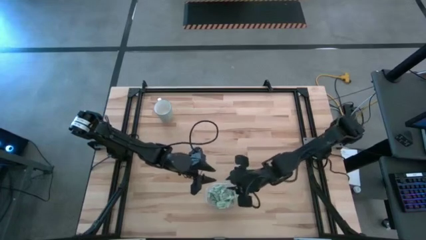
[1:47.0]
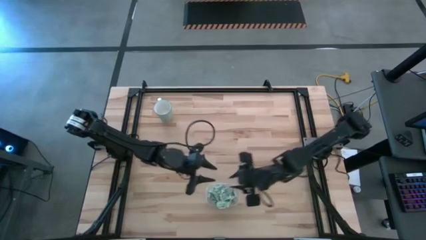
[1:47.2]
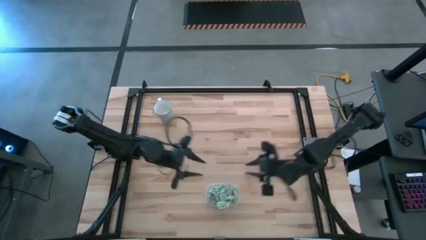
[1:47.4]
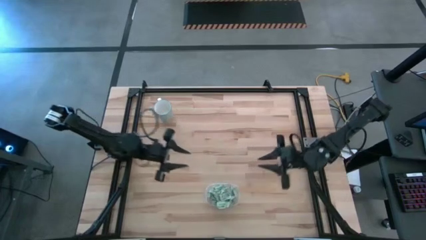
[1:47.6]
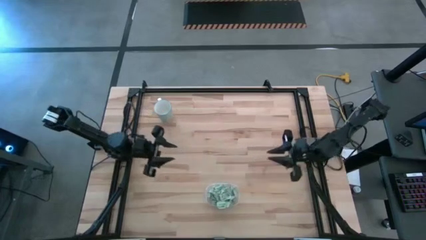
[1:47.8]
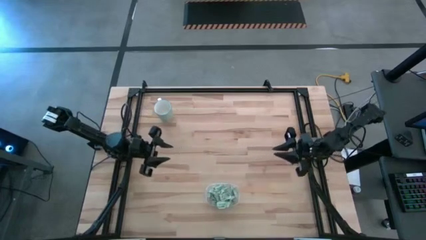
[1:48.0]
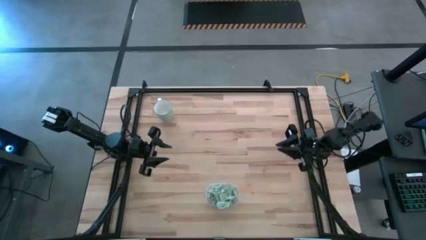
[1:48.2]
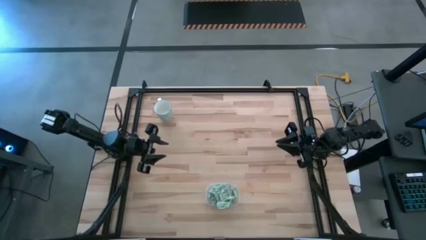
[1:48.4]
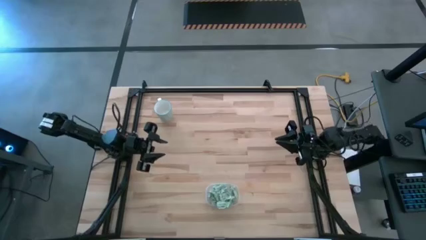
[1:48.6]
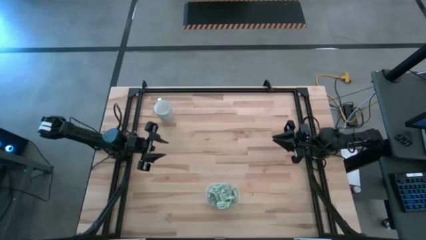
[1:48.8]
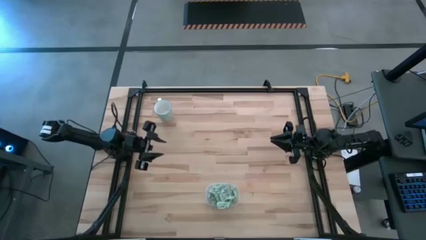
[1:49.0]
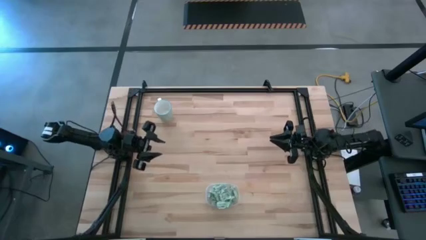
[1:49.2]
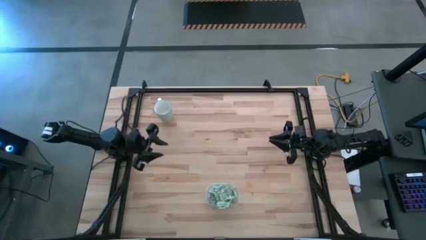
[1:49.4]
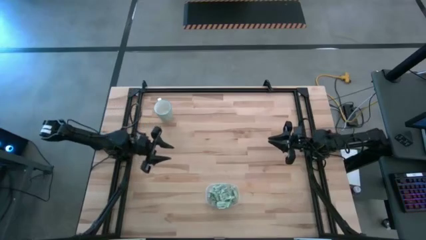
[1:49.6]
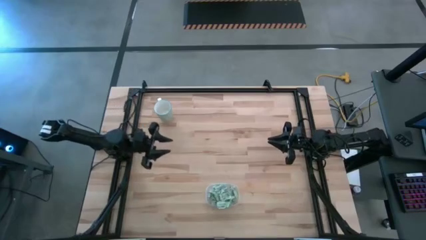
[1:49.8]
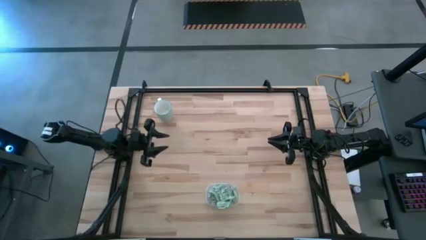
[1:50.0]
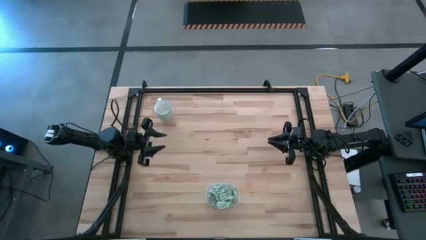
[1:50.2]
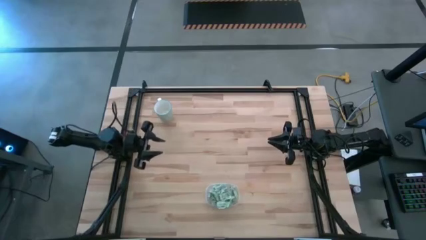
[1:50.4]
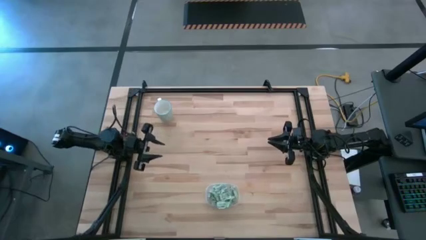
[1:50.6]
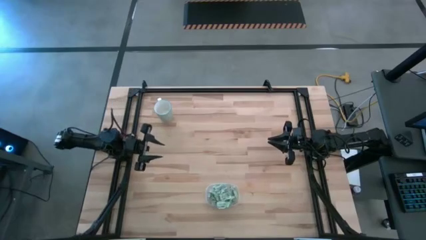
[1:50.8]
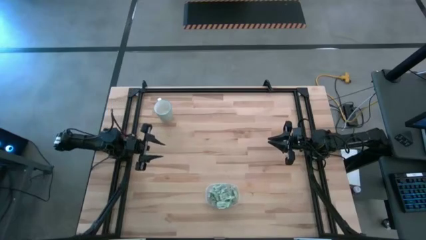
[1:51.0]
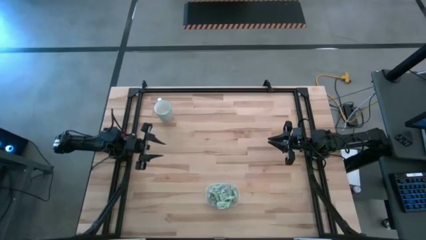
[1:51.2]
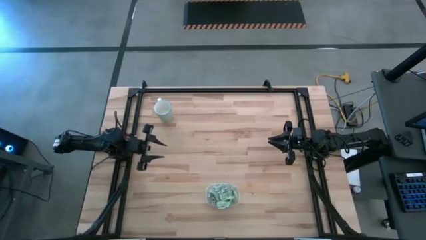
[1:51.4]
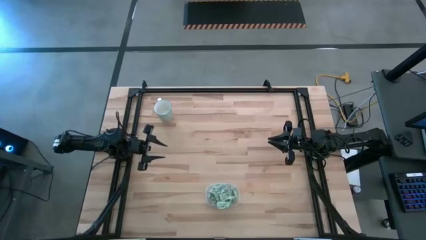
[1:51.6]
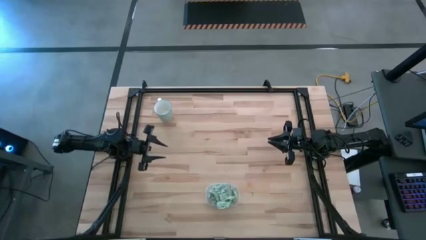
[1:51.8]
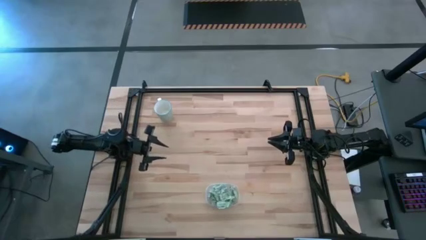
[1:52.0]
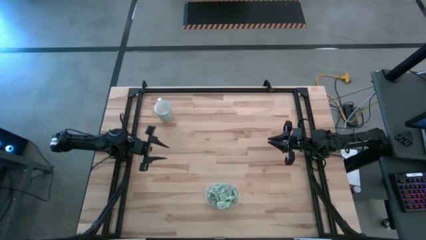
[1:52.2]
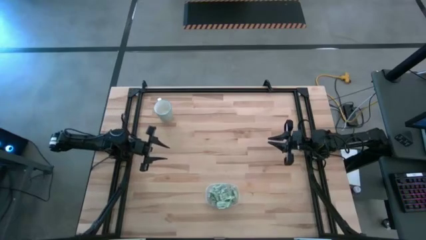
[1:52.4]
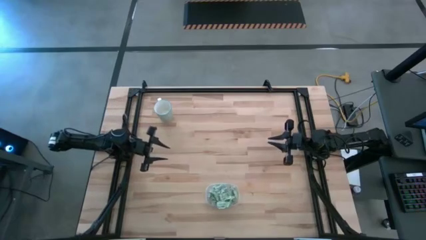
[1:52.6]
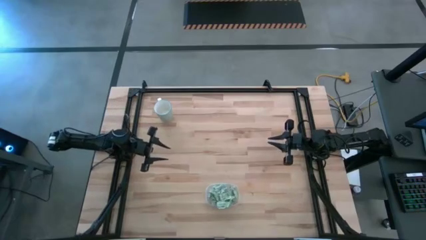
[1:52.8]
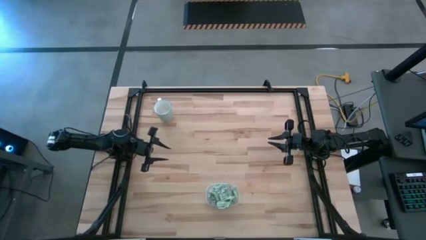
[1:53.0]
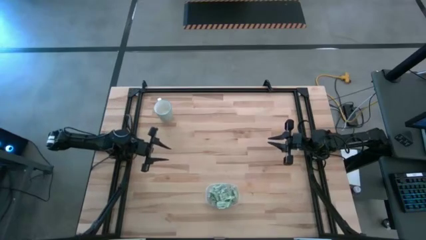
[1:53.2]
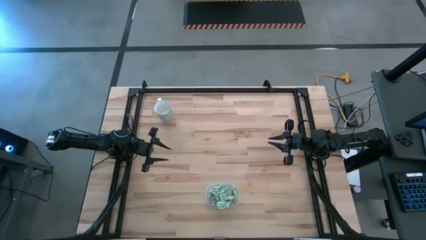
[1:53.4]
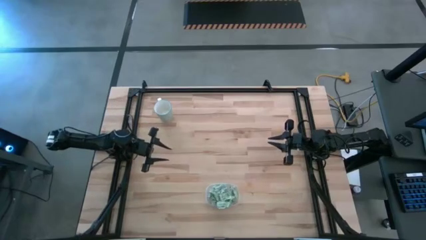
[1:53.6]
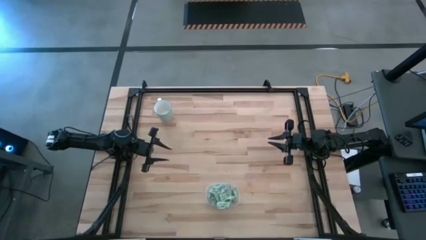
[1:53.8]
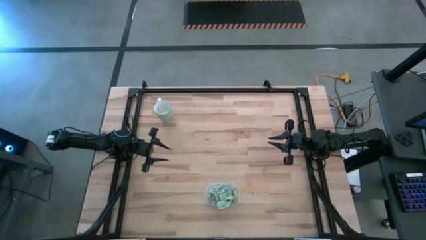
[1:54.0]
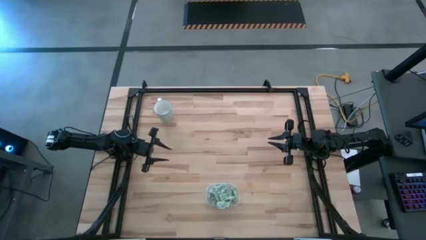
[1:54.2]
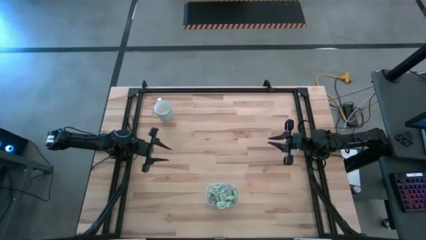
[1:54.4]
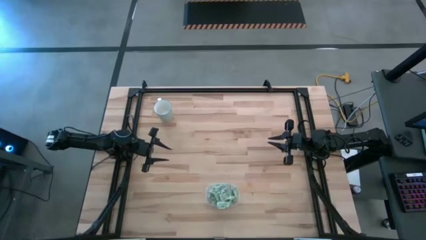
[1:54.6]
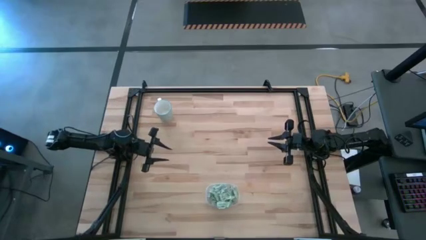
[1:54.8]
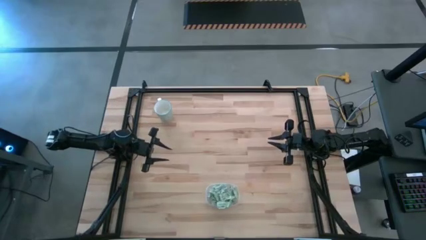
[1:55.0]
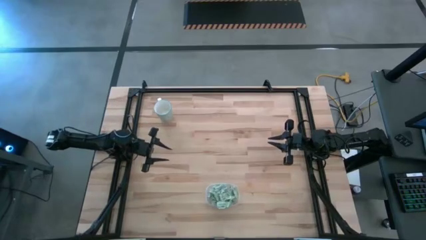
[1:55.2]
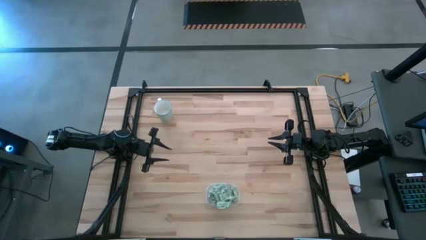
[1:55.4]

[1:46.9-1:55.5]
Task: Pick and place Stevia / Truvia into bins
Return to Home Position

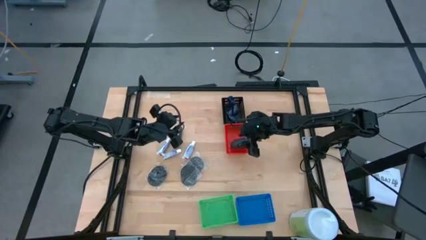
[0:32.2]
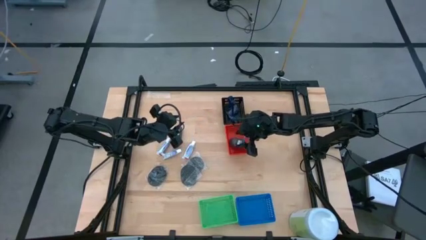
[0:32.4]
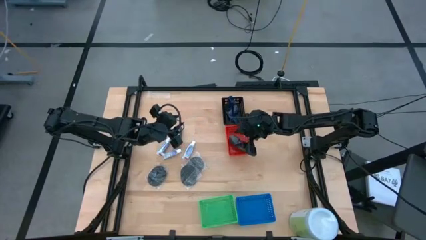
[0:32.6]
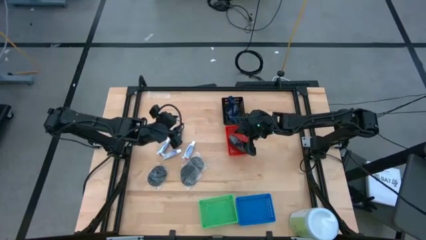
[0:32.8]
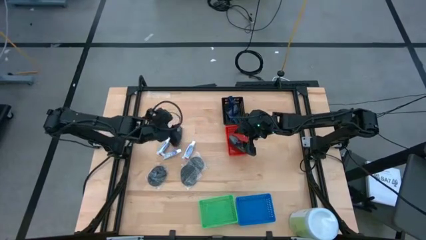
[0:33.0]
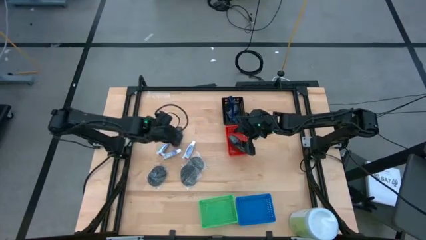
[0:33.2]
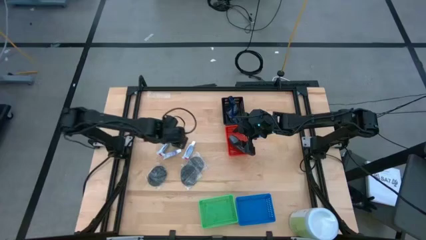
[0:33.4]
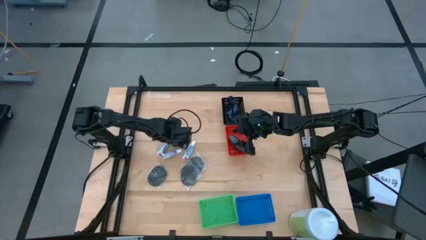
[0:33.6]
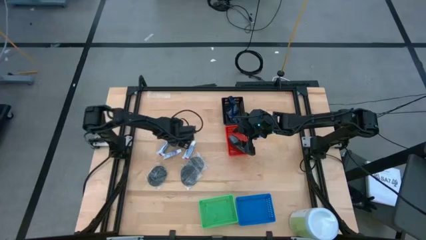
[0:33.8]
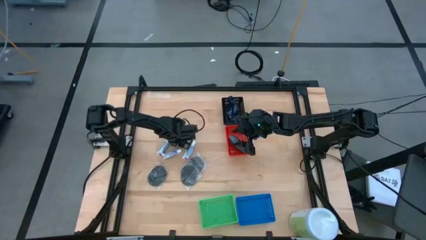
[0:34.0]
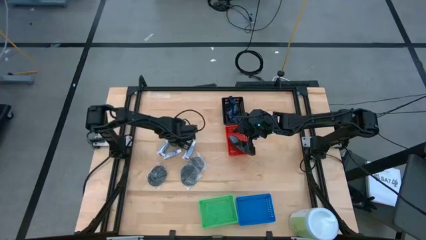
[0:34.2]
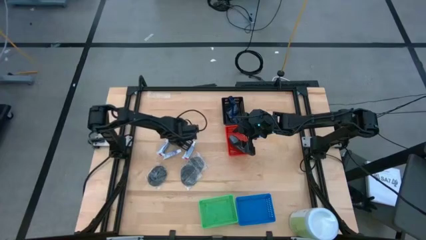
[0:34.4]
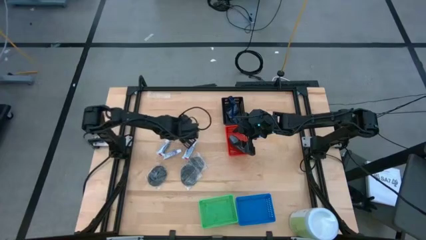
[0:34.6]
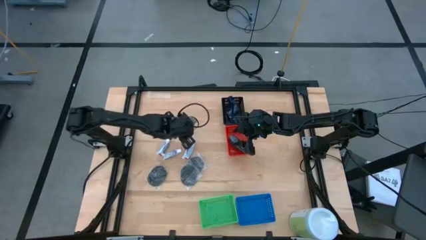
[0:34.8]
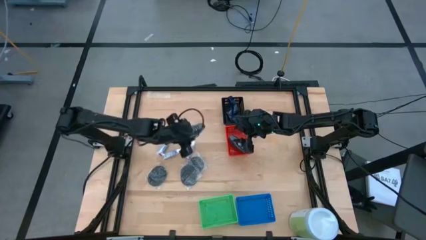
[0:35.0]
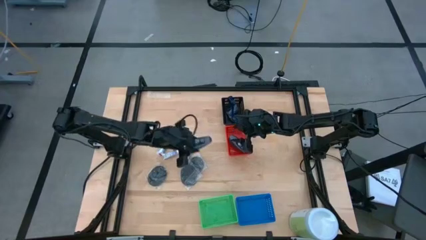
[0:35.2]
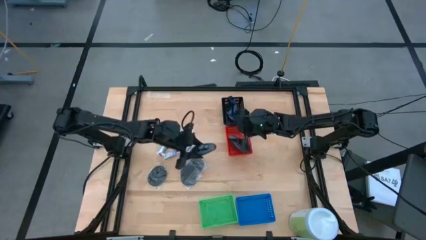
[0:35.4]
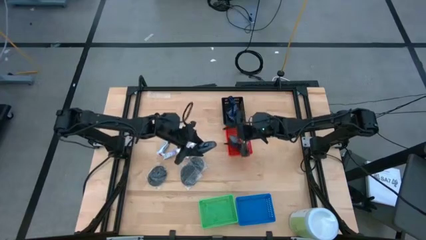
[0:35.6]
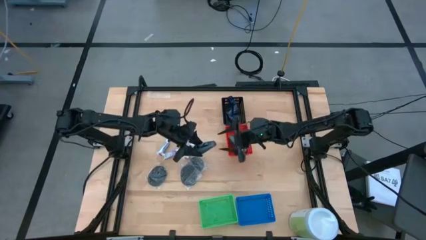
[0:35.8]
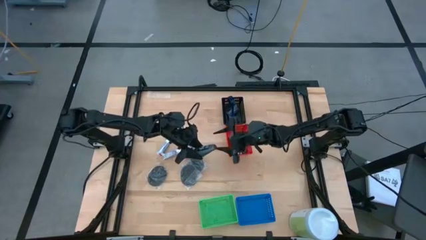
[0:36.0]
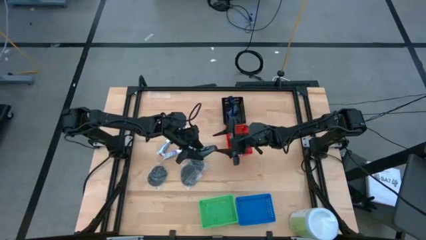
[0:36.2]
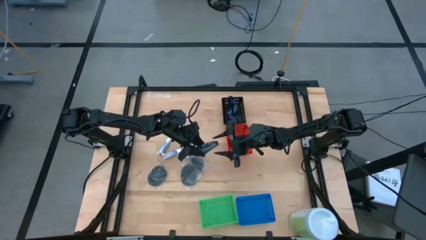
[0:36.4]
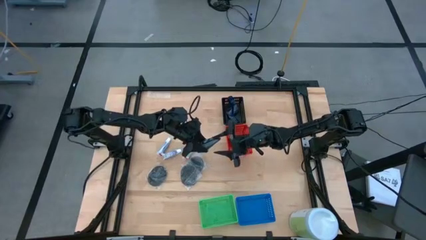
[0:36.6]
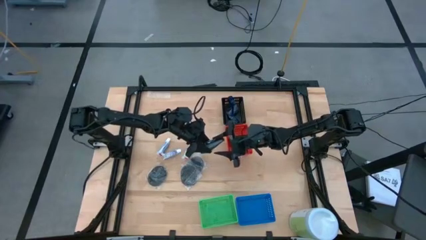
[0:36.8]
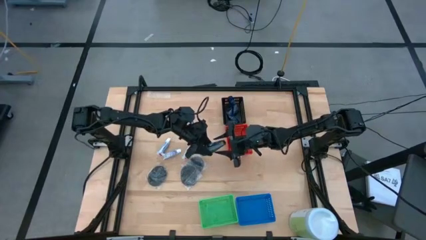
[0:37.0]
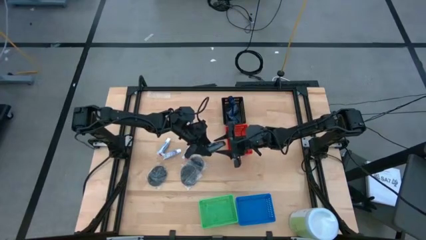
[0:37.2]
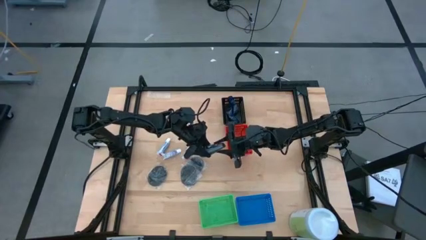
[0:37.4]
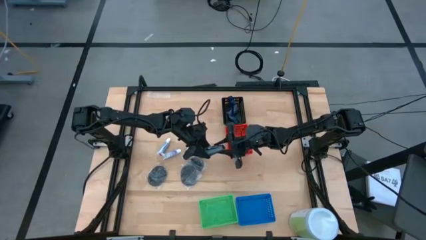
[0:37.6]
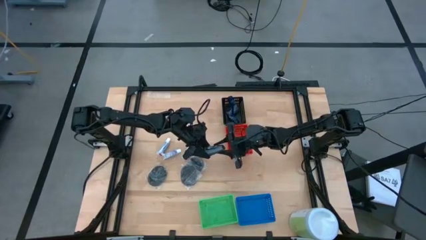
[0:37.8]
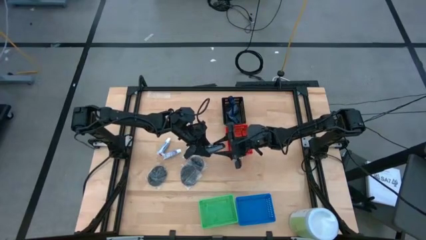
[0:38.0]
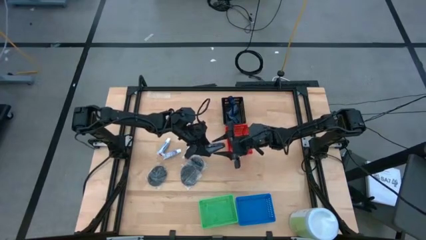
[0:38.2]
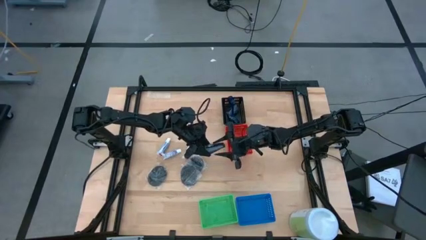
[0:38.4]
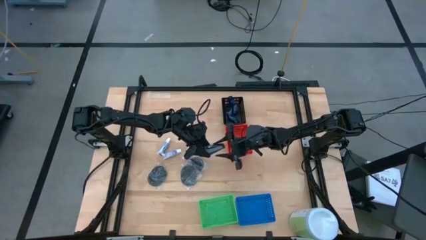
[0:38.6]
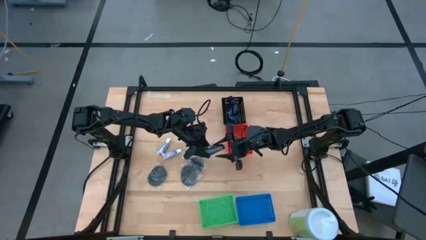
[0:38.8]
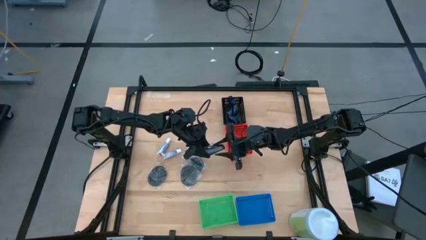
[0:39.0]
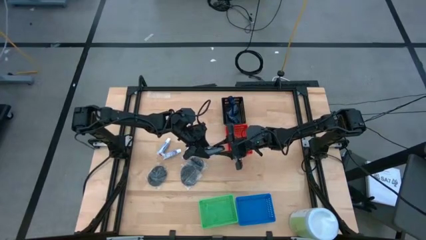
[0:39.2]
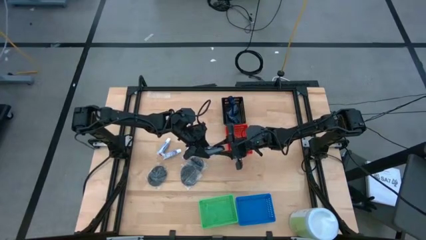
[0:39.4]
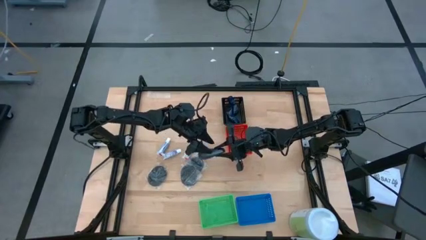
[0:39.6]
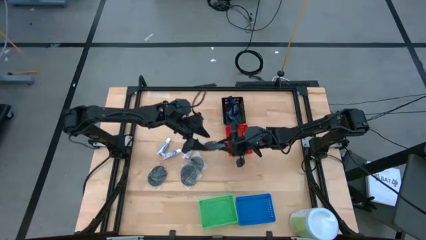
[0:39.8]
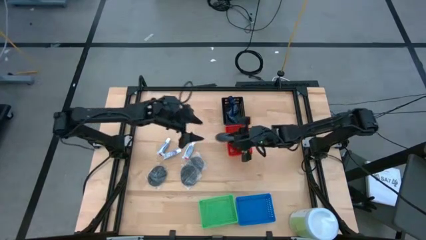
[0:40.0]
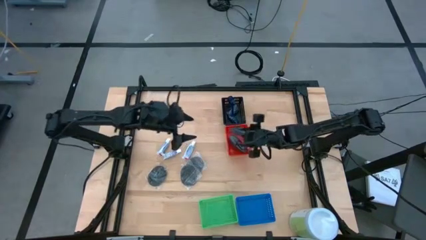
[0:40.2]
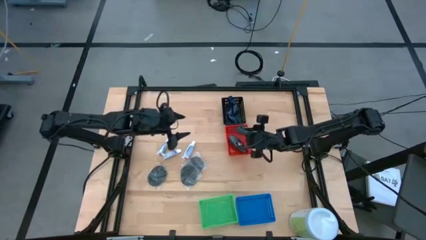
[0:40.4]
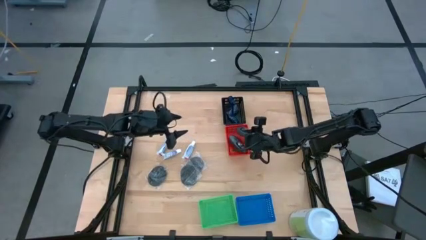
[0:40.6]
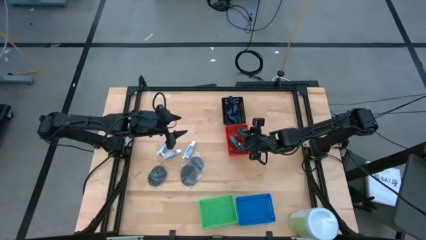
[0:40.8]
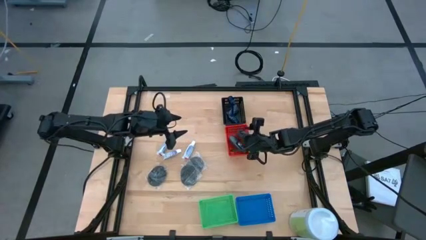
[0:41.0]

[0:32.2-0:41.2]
Task: Pick & Place Travel size toiletries
Put the gray deodorant into the red bin
